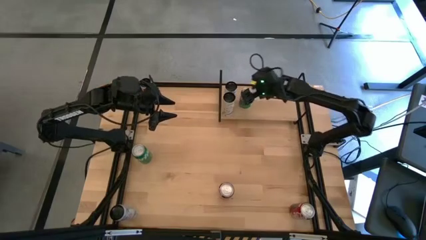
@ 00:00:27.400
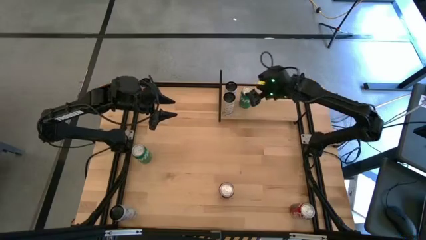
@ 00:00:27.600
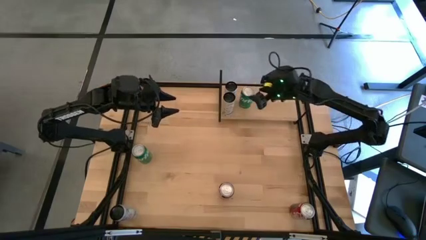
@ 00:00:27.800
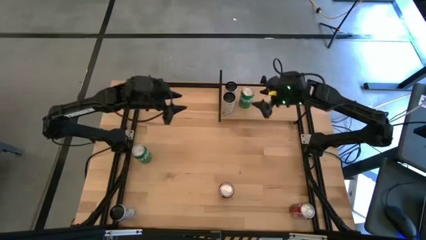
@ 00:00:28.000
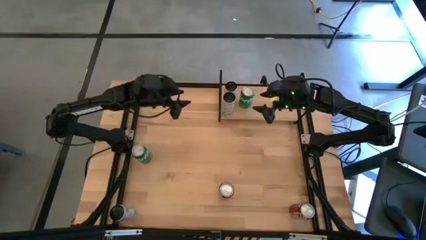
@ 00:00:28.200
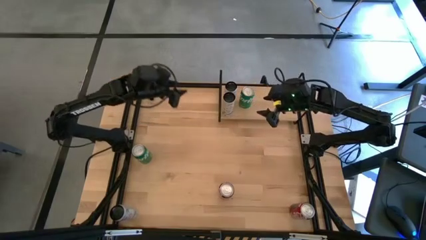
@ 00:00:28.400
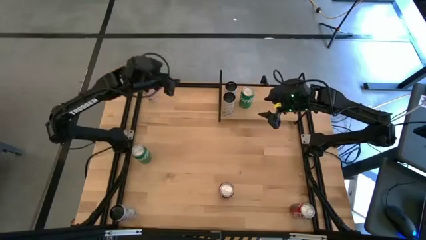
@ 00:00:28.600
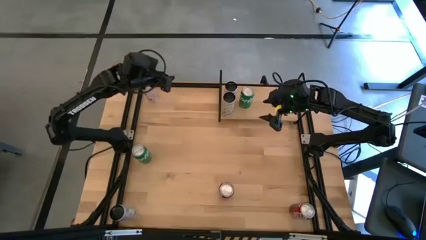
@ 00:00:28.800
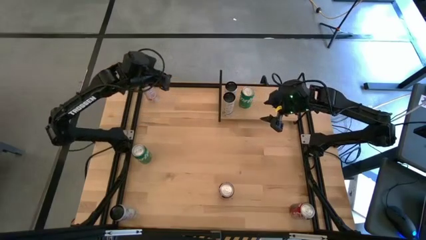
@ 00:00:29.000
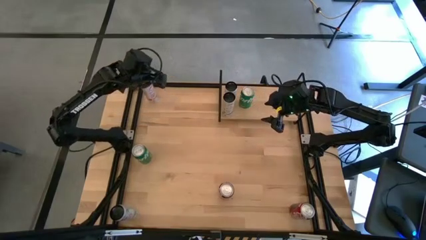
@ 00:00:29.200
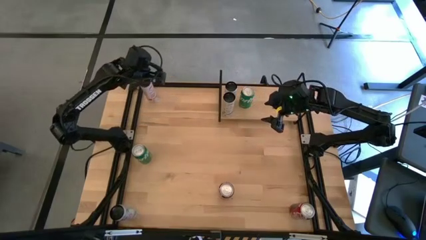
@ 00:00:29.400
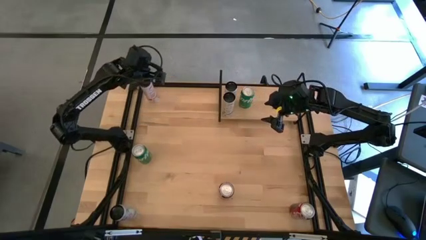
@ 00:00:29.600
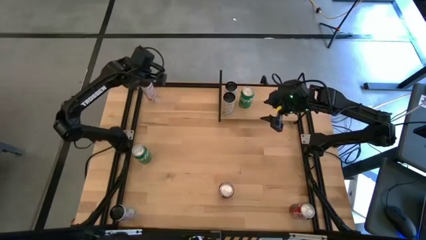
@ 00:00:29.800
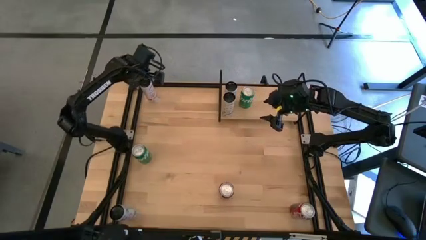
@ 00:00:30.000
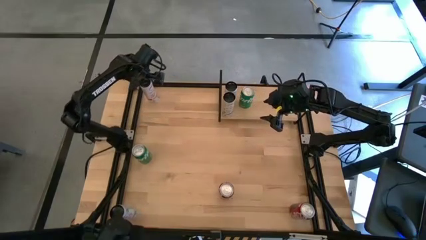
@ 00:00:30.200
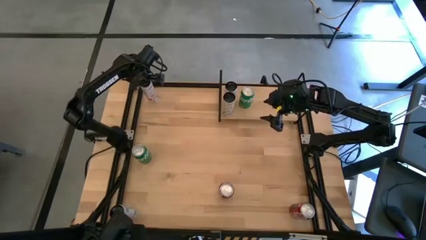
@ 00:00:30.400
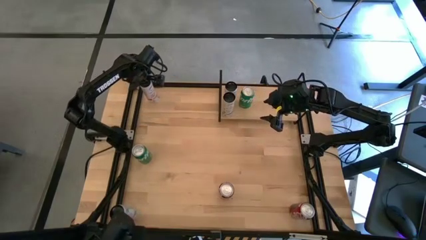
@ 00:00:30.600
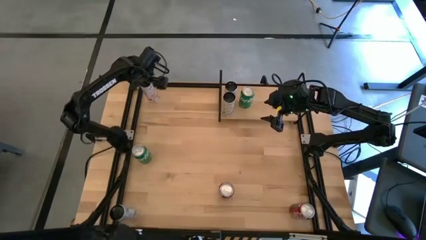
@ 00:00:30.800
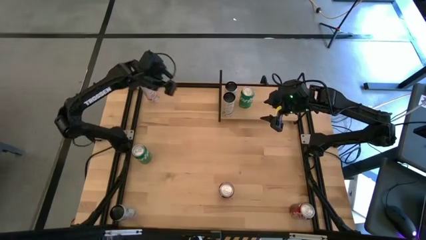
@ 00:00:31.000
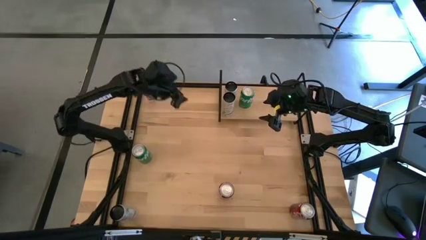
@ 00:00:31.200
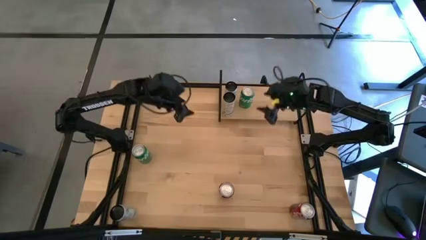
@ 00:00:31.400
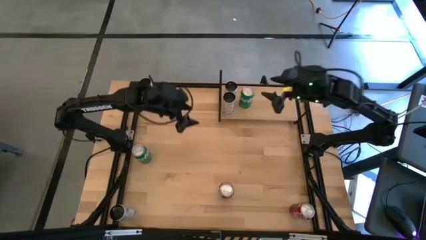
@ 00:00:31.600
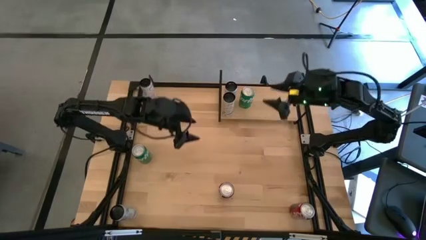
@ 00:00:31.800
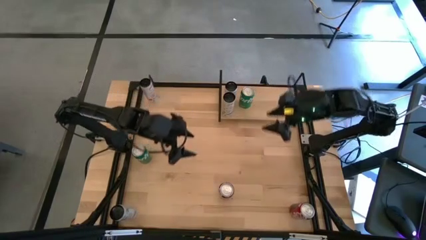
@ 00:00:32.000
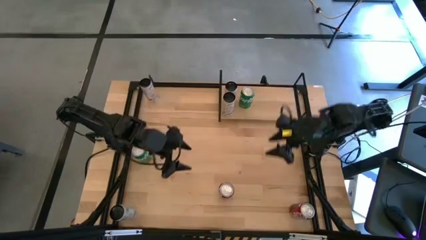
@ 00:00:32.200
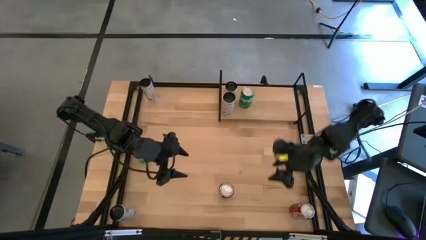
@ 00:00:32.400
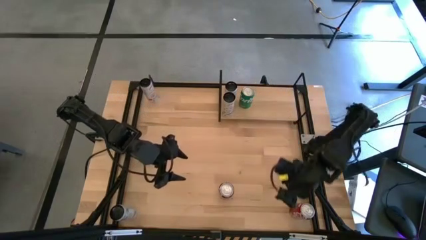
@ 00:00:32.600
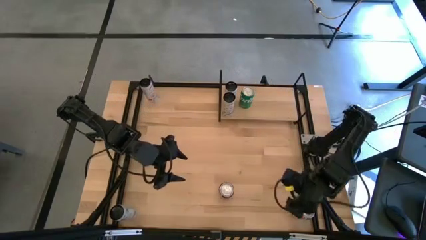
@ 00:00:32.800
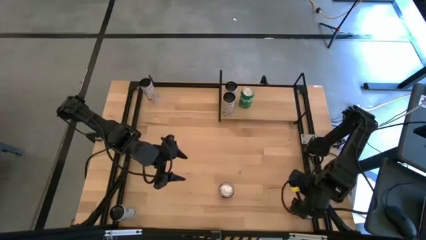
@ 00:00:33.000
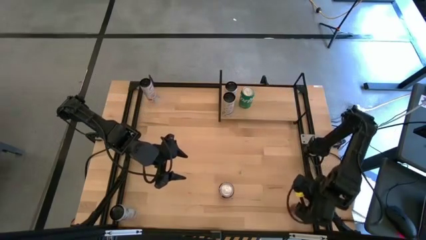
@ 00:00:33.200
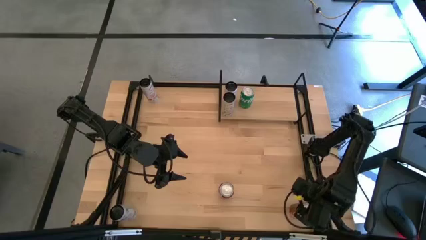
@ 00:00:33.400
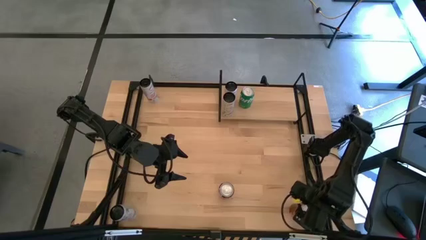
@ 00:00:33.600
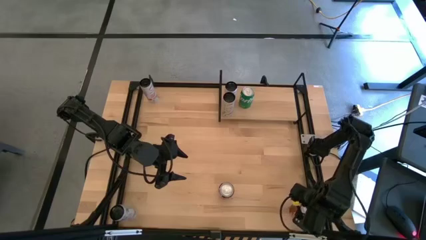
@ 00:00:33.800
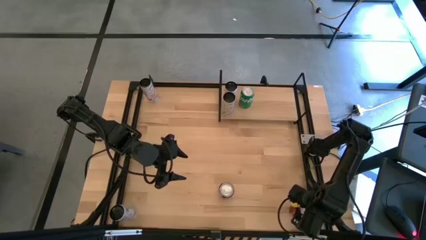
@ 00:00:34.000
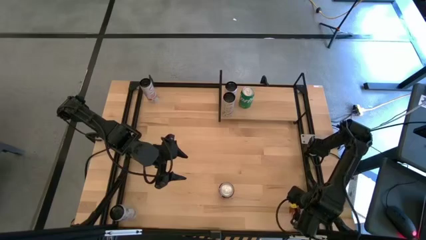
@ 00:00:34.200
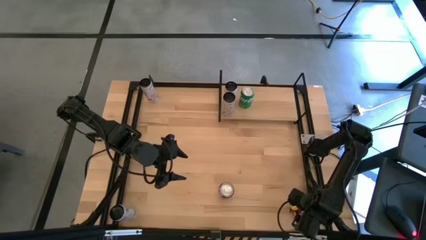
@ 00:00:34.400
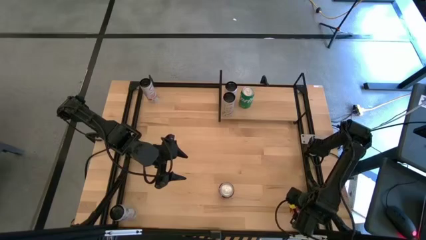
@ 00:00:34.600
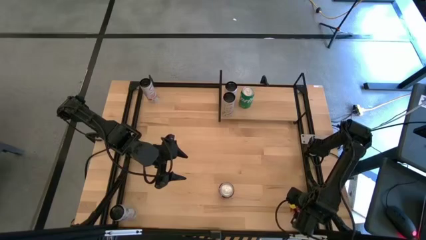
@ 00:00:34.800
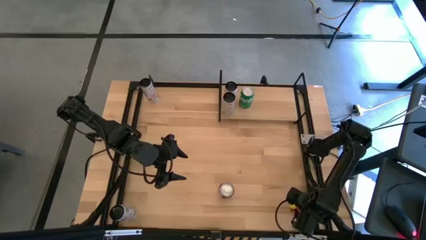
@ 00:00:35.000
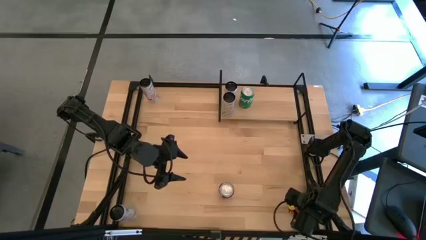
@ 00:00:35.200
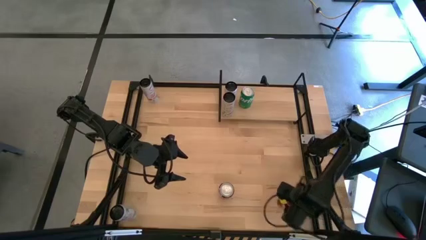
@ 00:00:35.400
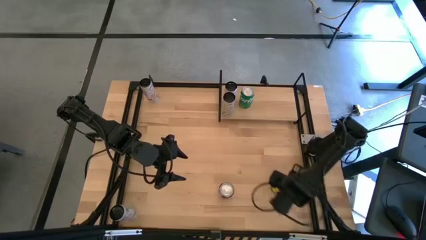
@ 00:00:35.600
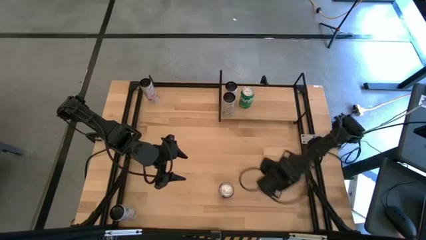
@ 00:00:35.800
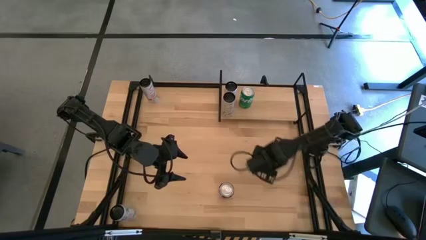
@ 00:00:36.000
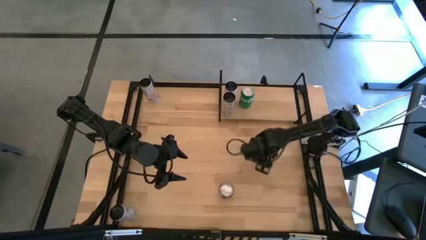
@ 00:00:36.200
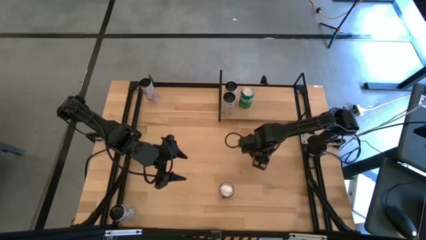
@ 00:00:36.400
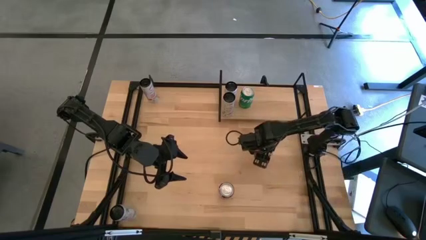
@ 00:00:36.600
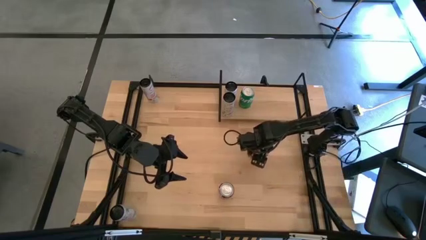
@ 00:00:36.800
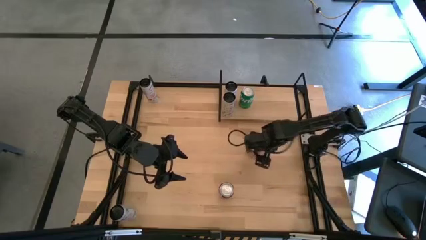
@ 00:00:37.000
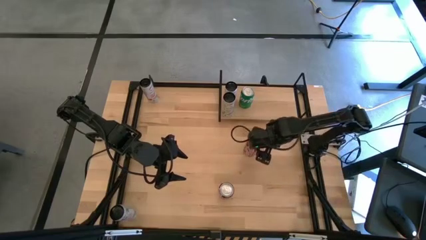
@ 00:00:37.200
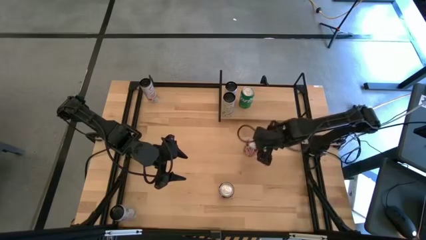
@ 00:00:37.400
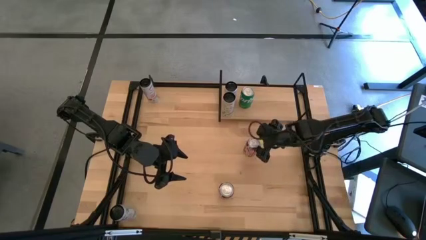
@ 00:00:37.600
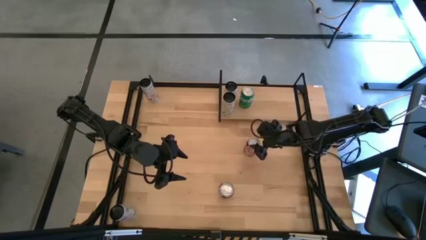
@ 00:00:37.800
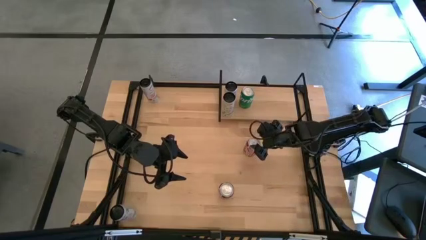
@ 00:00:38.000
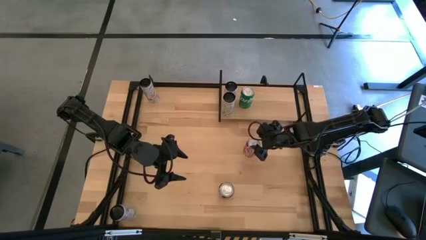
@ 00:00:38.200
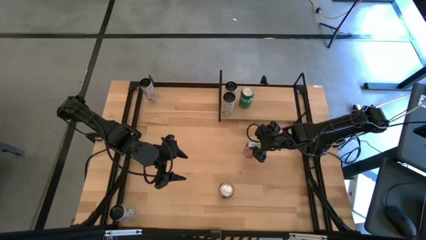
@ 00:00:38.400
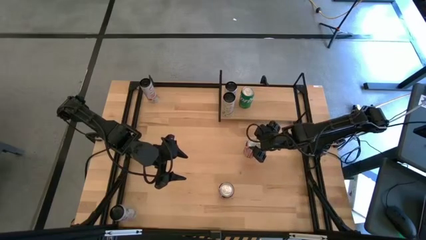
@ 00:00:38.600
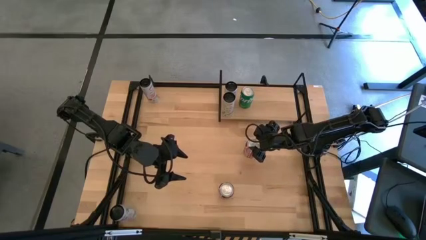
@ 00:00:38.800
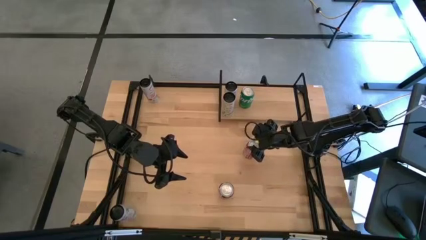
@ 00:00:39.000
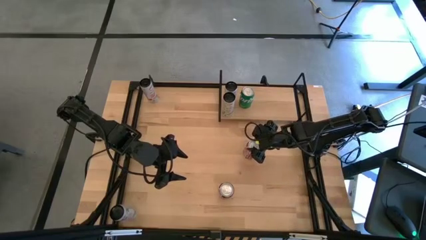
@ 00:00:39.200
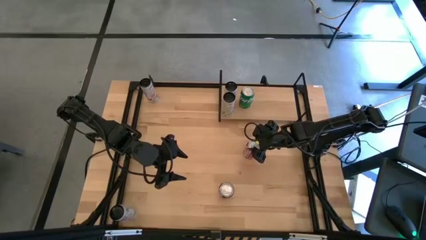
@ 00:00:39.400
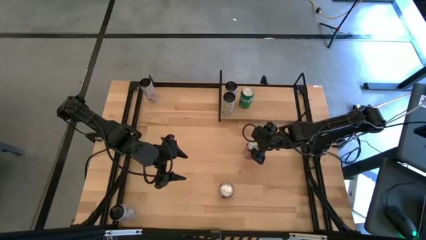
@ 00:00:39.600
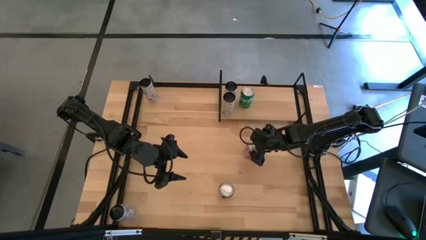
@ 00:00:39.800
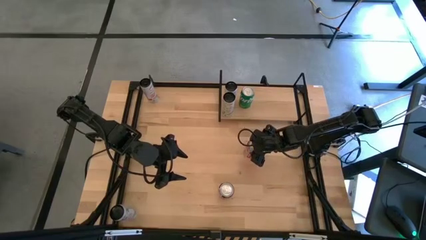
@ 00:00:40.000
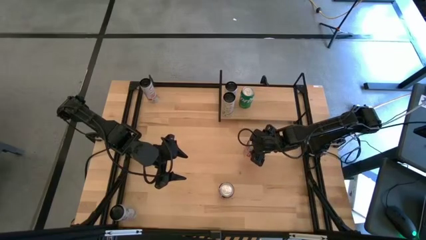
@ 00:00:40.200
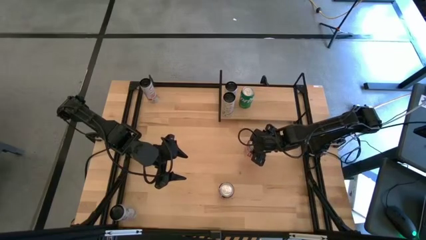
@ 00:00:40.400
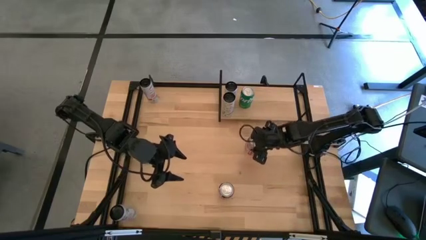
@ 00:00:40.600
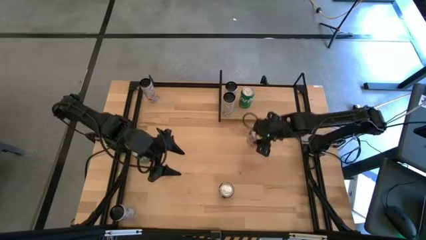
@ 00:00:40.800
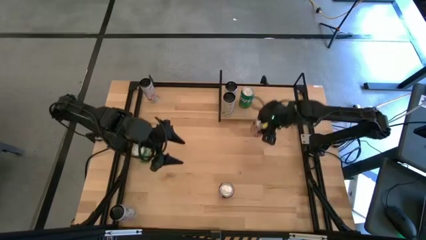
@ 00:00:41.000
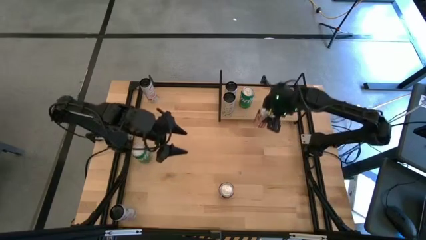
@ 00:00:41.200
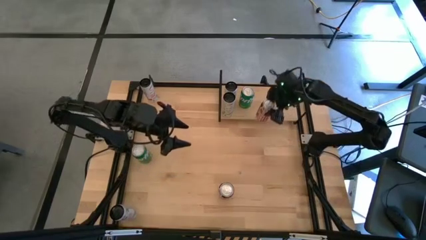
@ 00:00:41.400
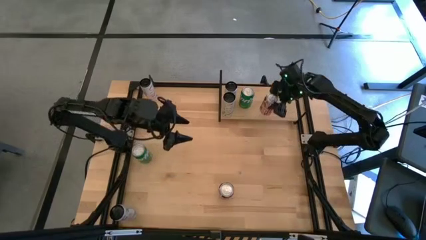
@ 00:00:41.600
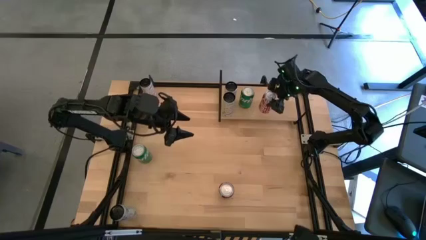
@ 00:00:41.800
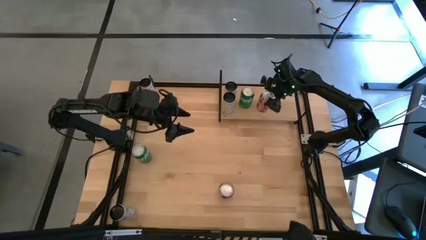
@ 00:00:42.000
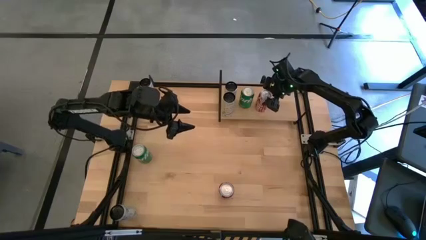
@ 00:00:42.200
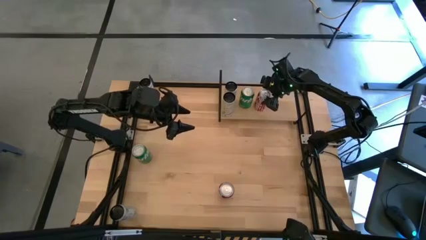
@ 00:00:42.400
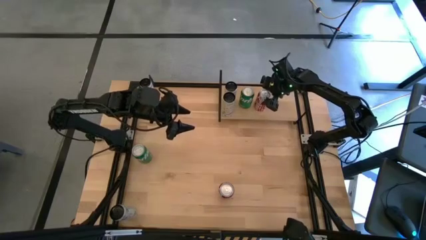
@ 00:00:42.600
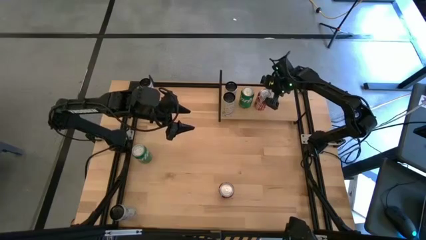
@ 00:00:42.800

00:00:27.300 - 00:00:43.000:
Task: Place canned beverage on shelf
Put the bottom red-white soda can on the shelf
